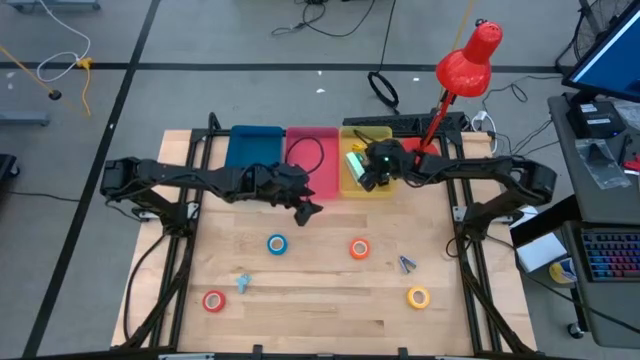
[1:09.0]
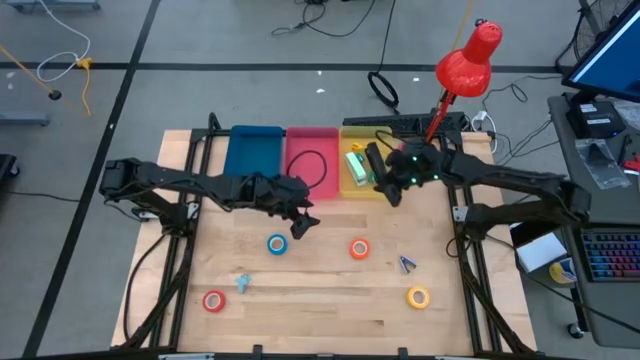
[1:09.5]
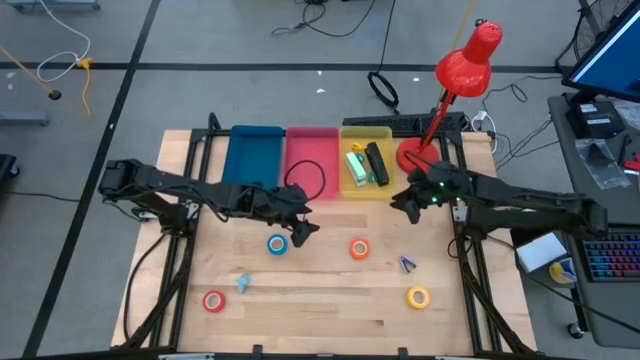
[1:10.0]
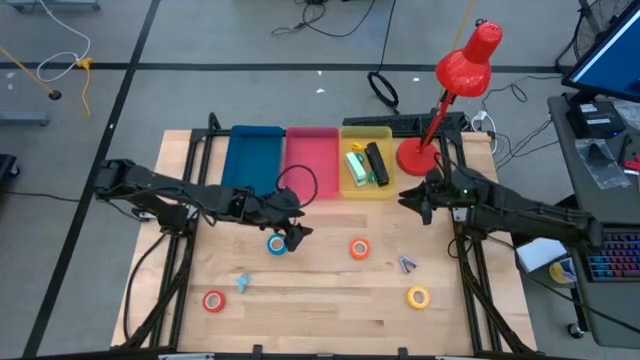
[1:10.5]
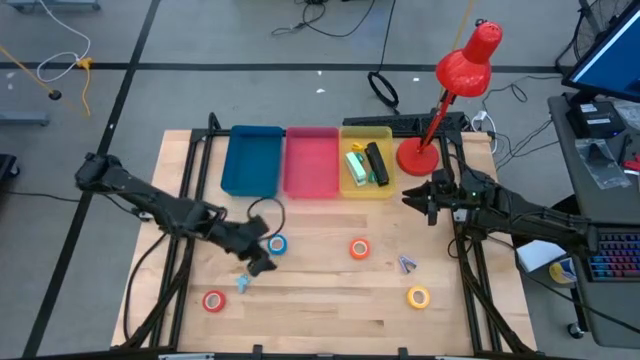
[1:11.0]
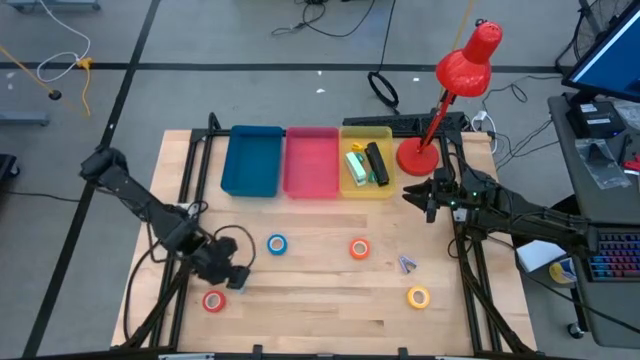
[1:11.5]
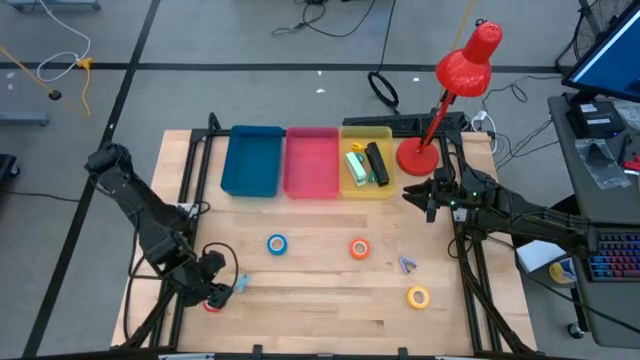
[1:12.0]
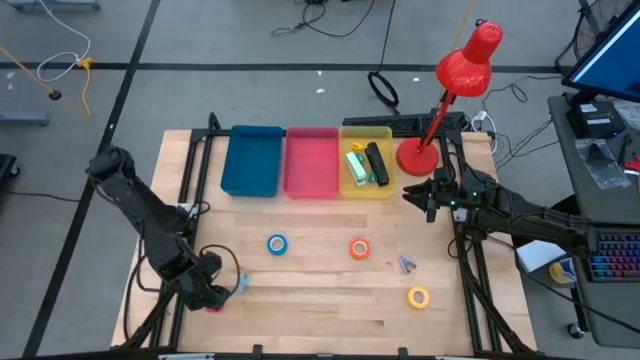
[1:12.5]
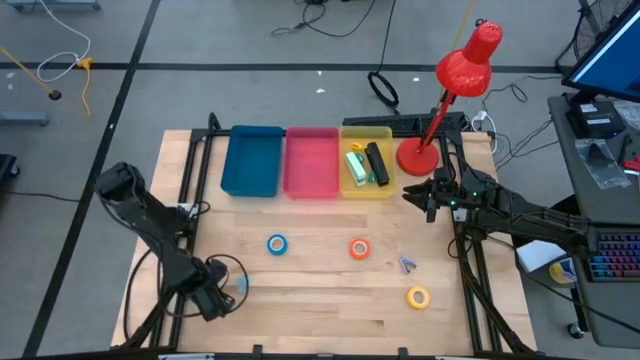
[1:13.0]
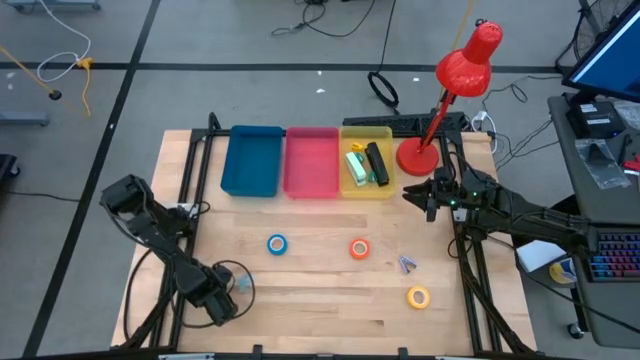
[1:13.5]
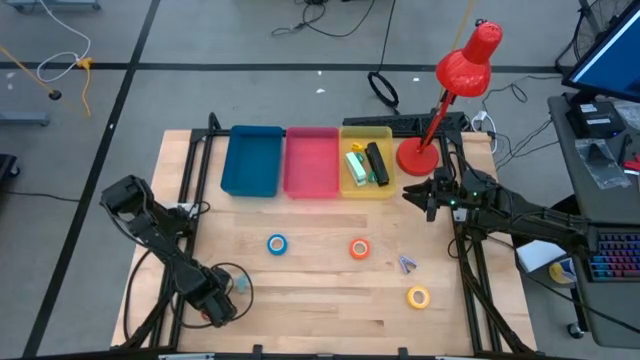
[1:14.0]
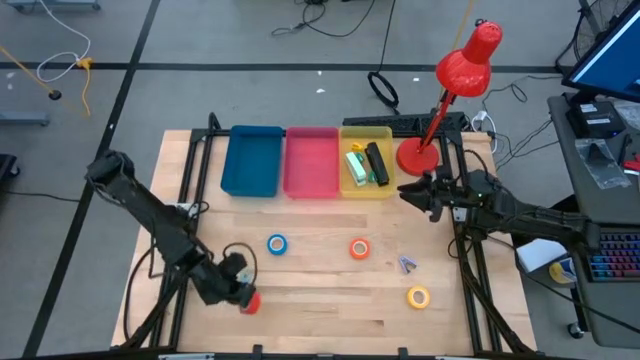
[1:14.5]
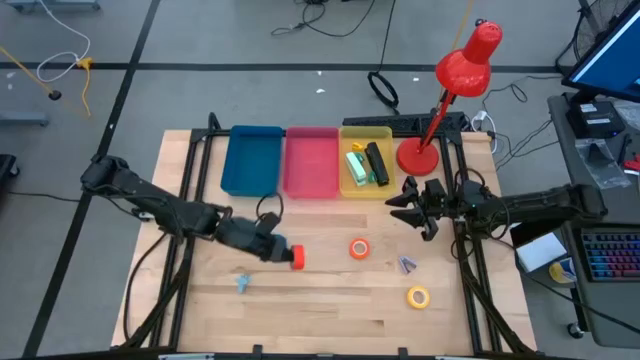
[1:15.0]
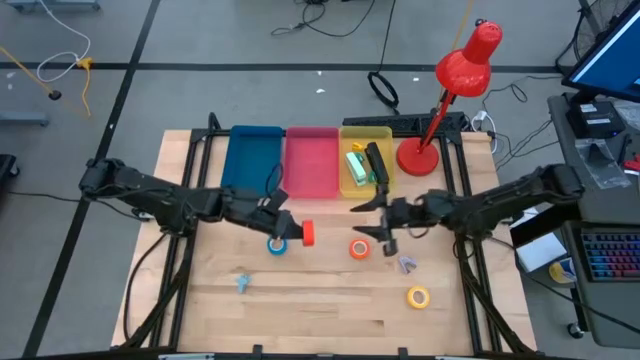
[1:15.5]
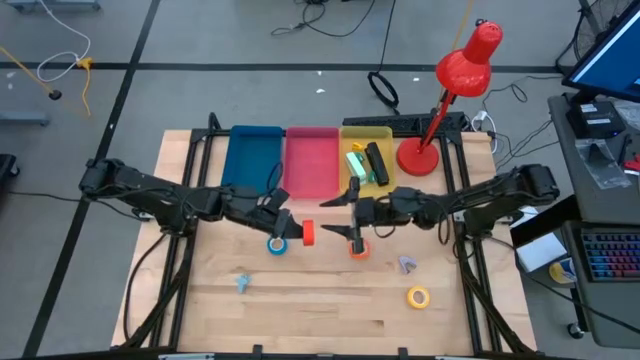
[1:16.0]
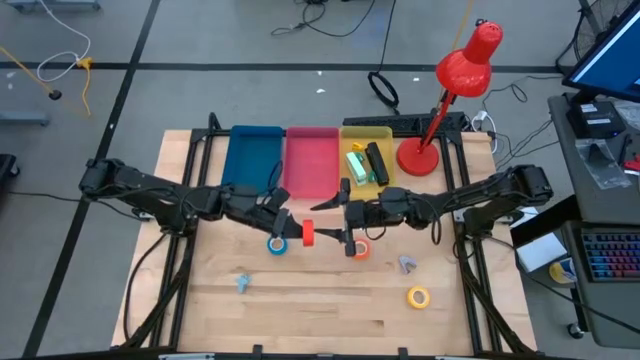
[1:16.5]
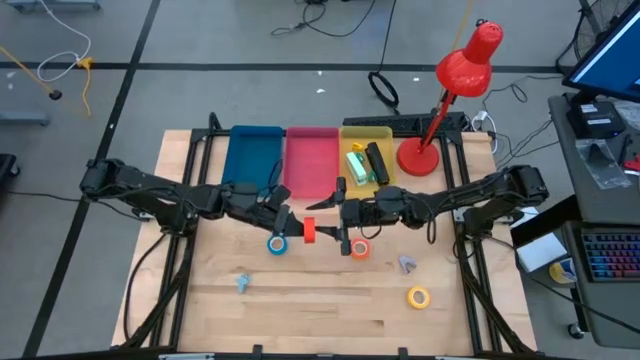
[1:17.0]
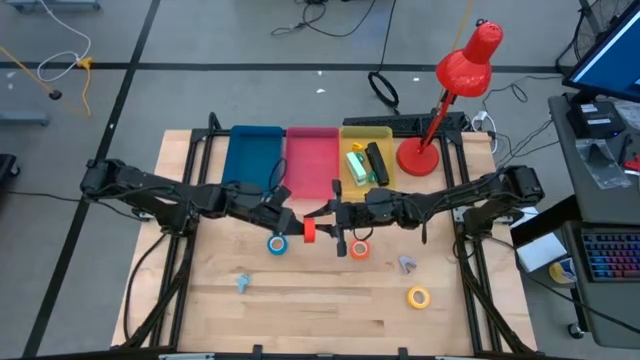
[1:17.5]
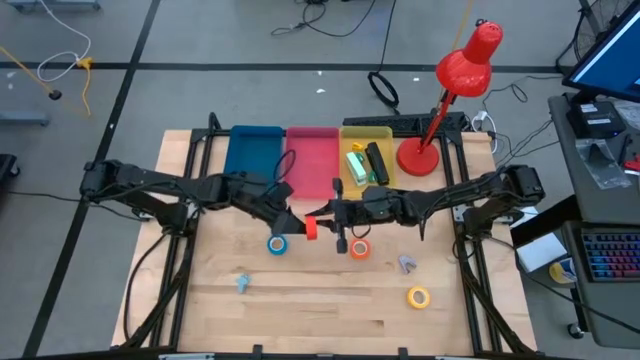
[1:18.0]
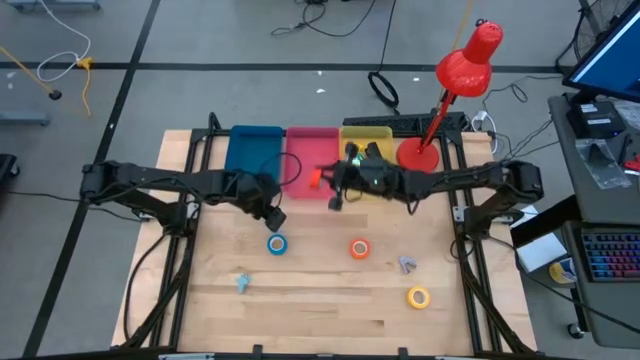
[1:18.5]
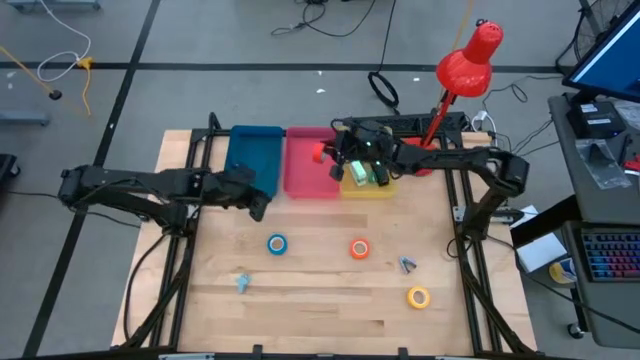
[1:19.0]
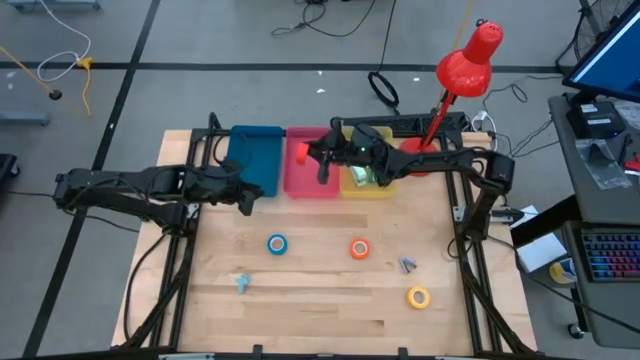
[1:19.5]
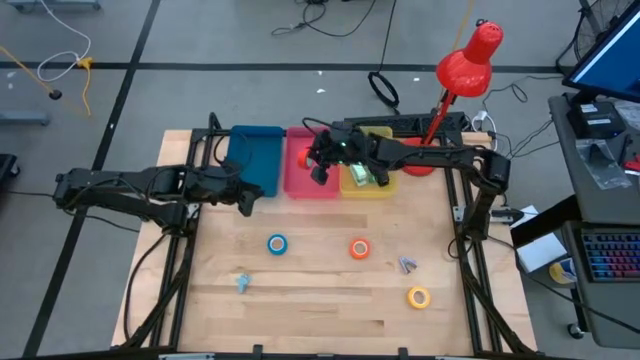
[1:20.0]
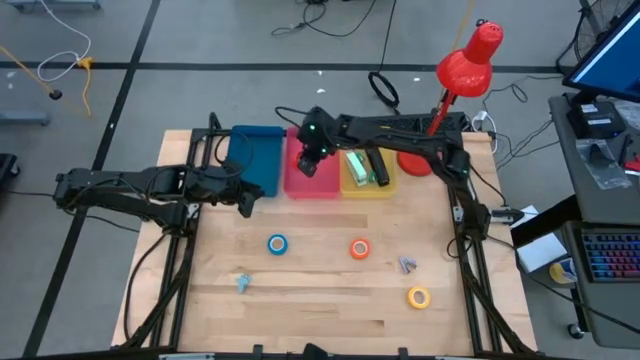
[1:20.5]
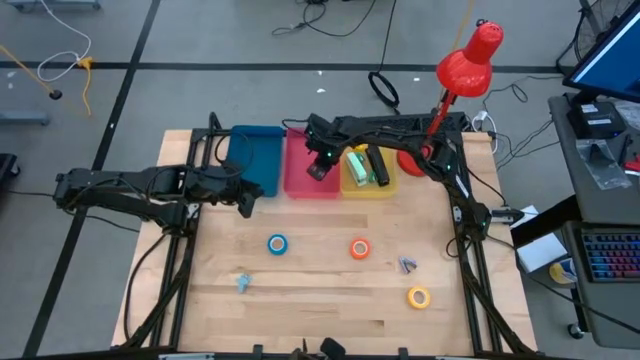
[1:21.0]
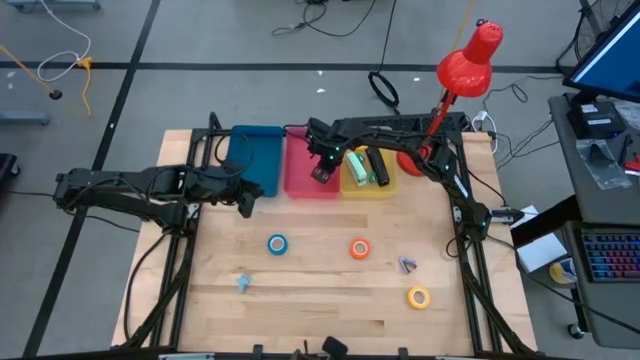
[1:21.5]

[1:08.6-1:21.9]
Task: Pick and place Stapler, Stapler remover, tape
Put the red tape into the pink bin

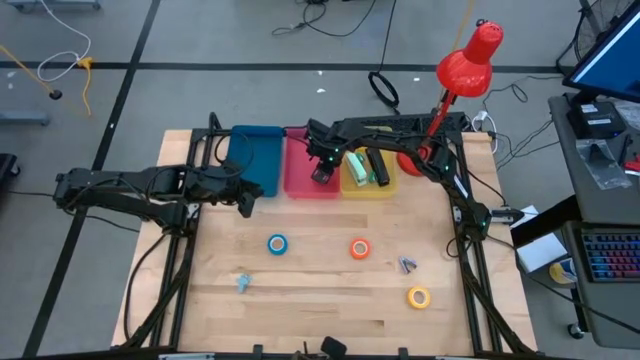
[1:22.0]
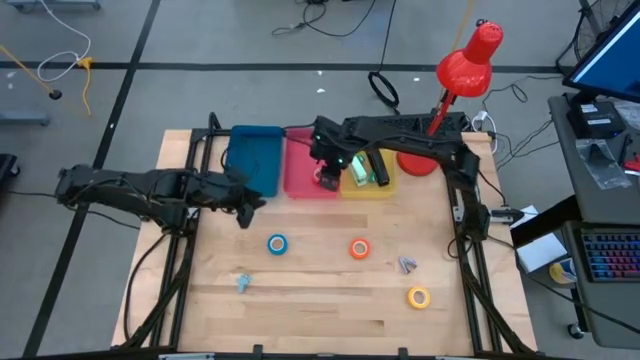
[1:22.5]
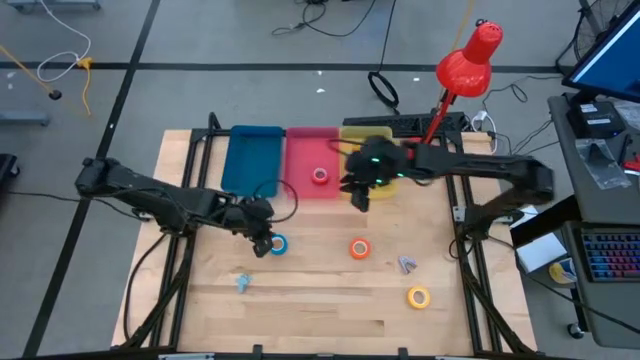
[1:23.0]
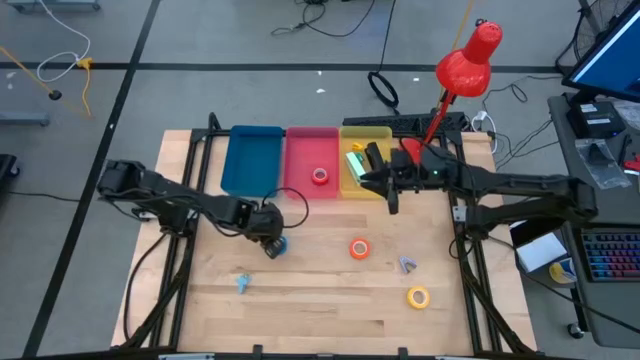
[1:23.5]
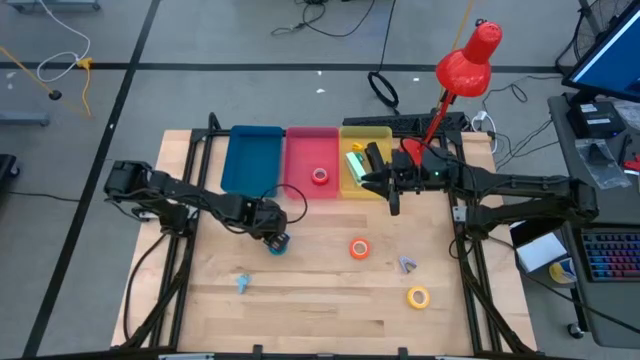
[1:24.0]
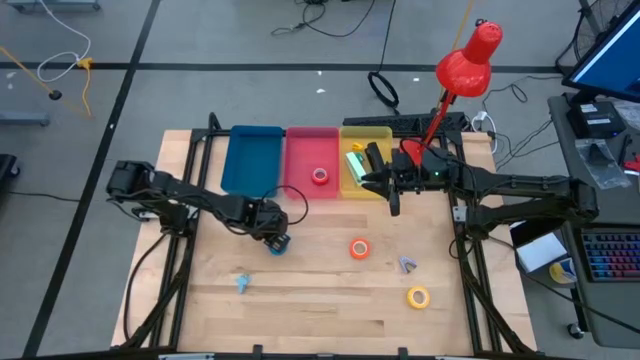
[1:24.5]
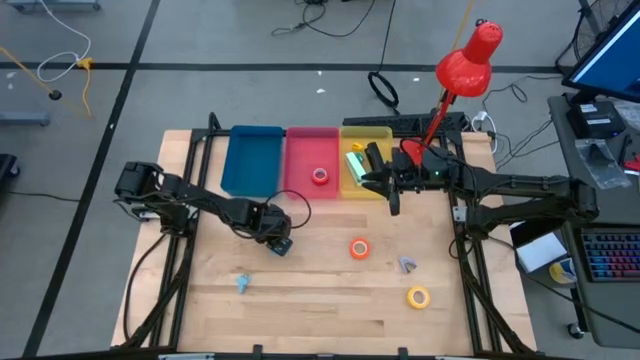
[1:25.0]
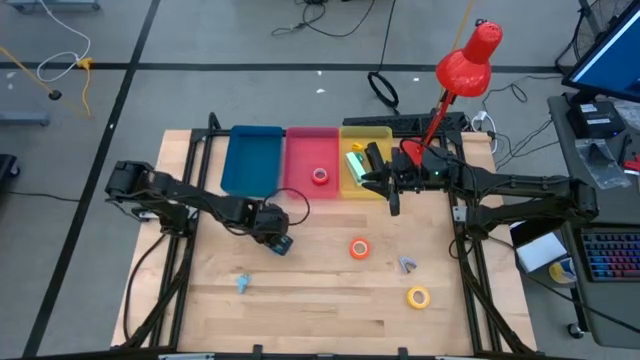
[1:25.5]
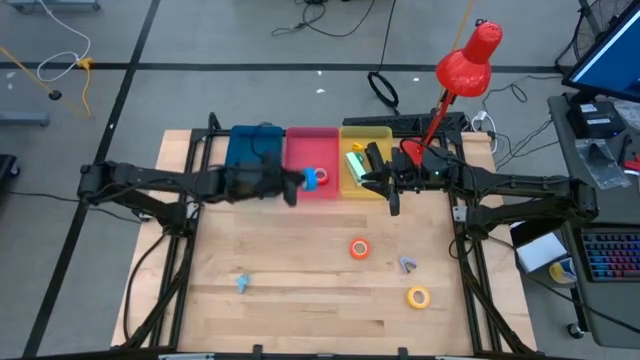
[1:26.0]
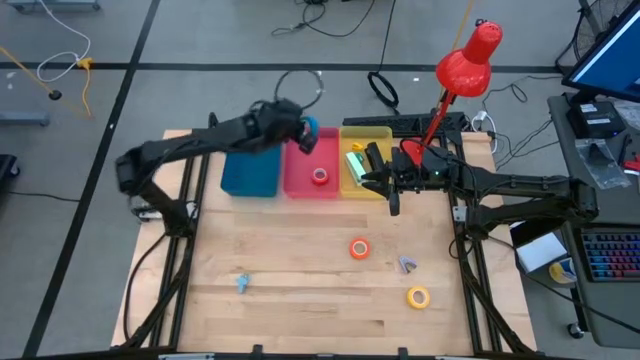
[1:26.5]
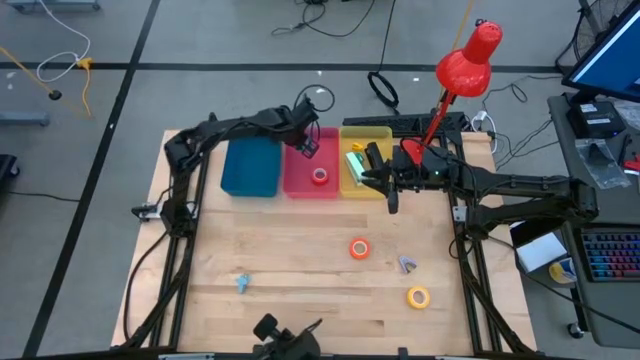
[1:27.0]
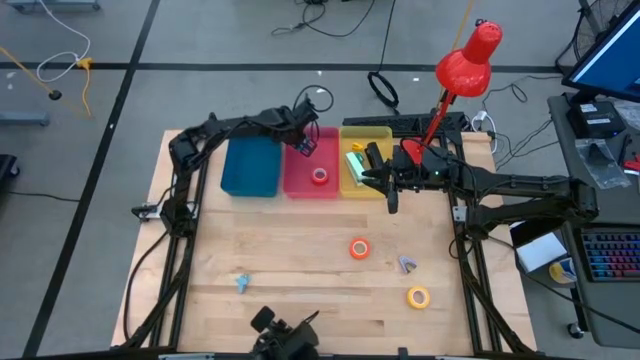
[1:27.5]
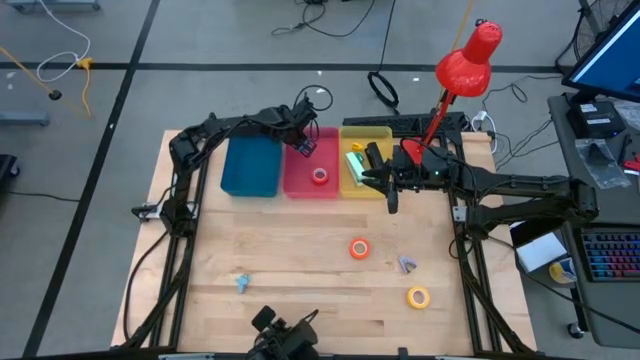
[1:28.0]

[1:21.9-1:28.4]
Put the blue tape into the pink bin

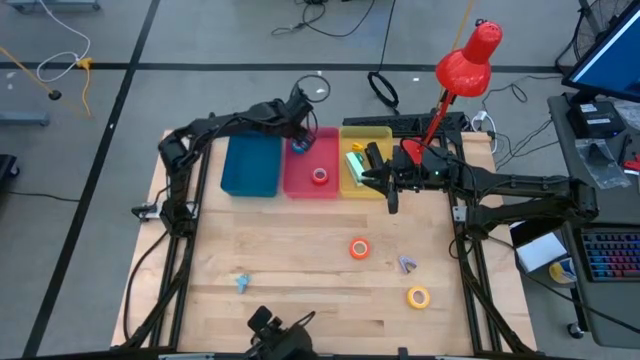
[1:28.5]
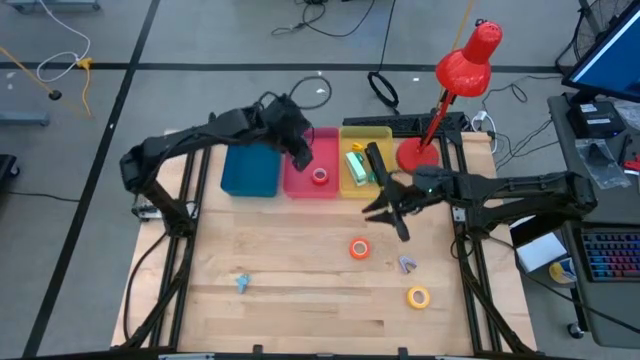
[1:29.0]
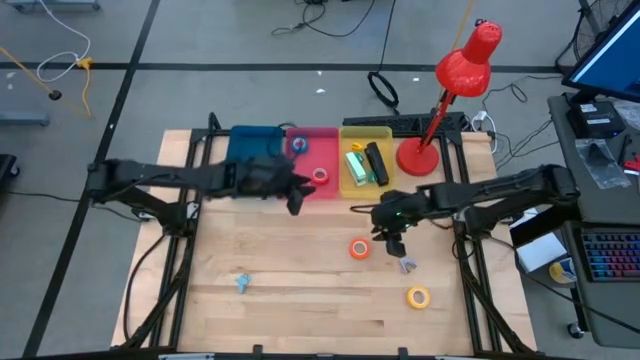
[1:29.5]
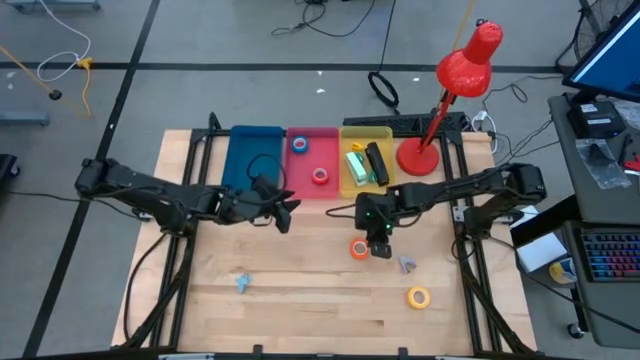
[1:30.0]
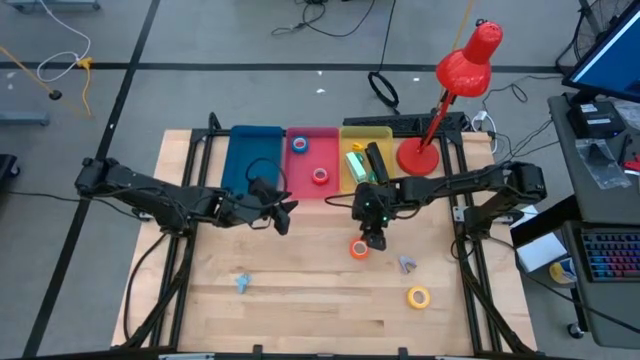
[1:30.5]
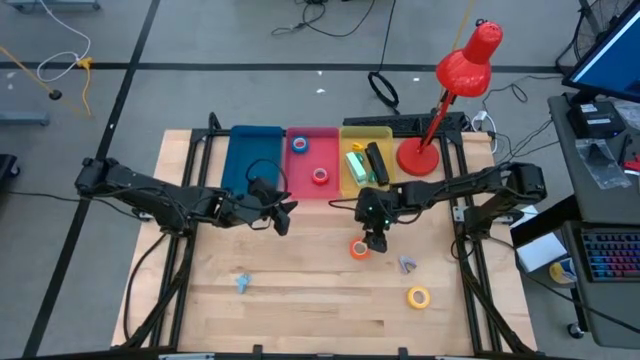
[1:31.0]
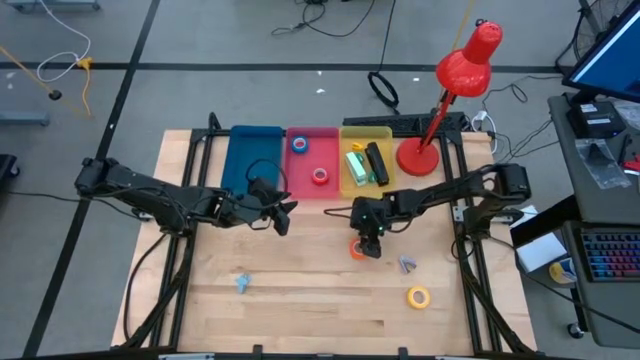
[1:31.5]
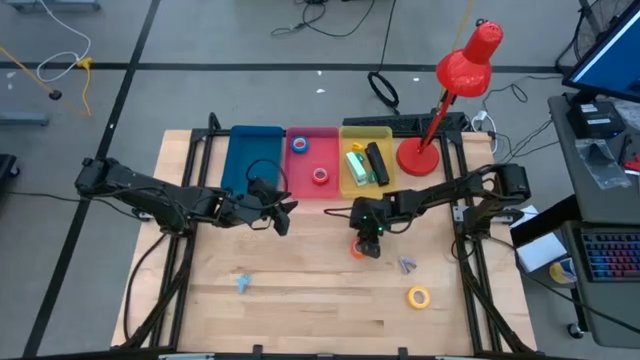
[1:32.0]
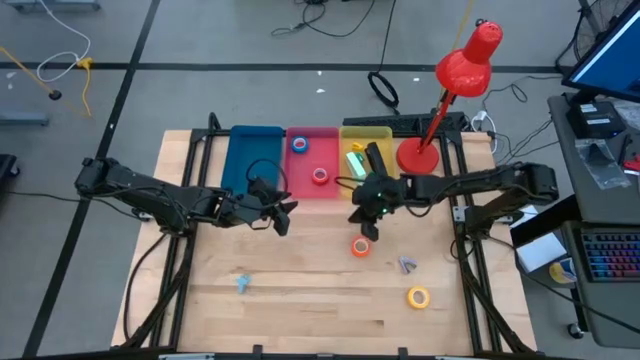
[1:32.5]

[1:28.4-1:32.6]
Put the orange tape into the pink bin
